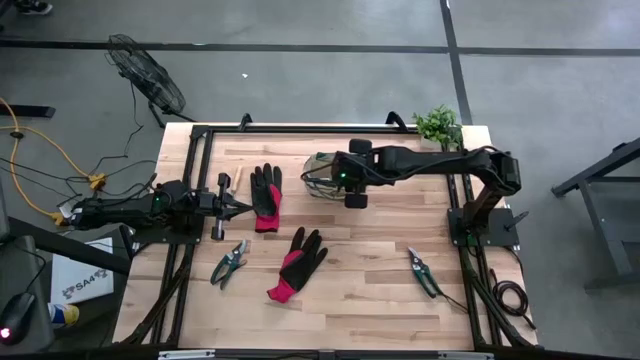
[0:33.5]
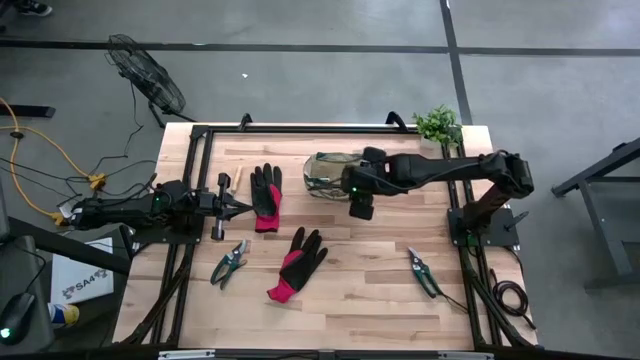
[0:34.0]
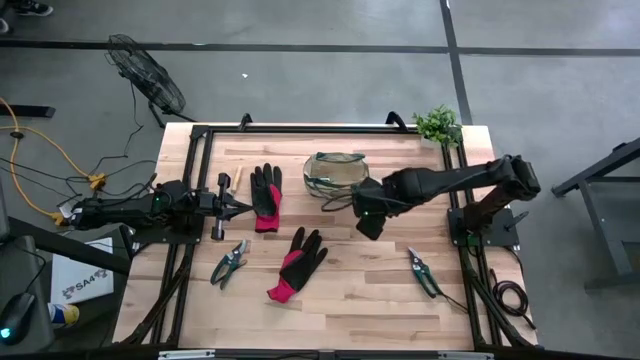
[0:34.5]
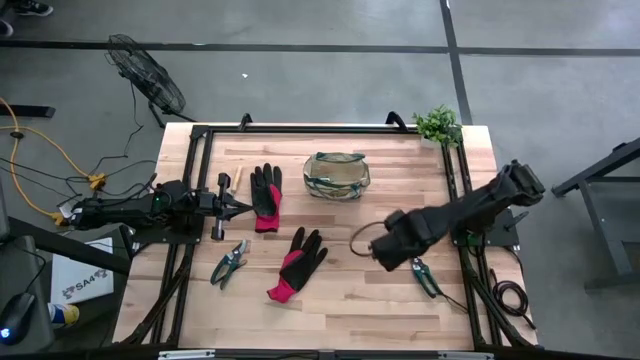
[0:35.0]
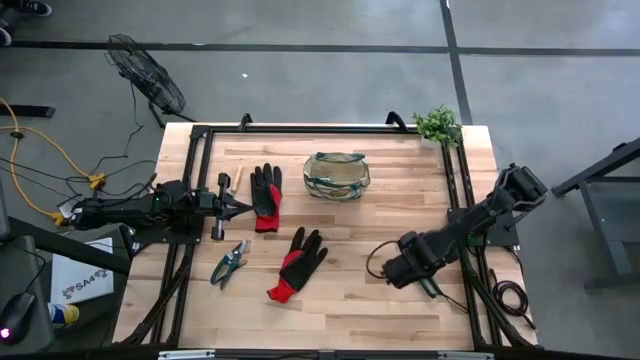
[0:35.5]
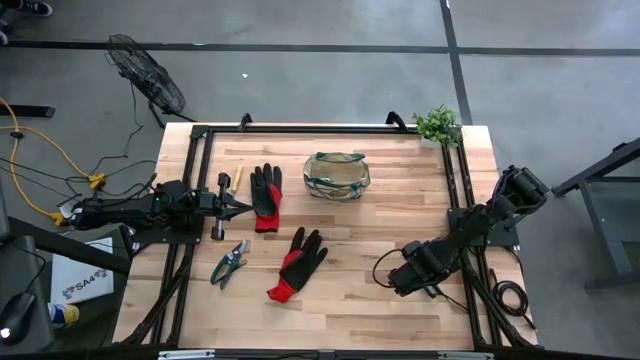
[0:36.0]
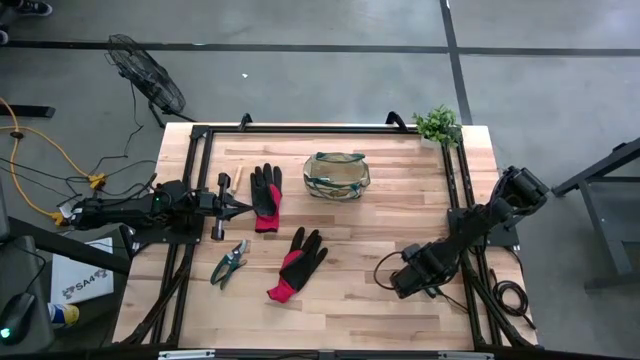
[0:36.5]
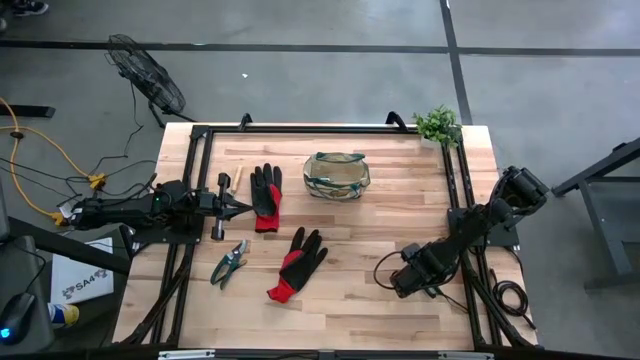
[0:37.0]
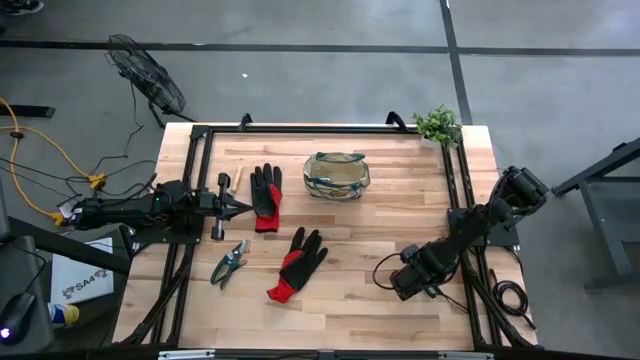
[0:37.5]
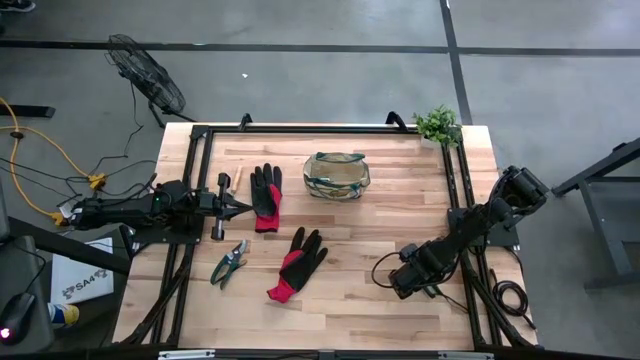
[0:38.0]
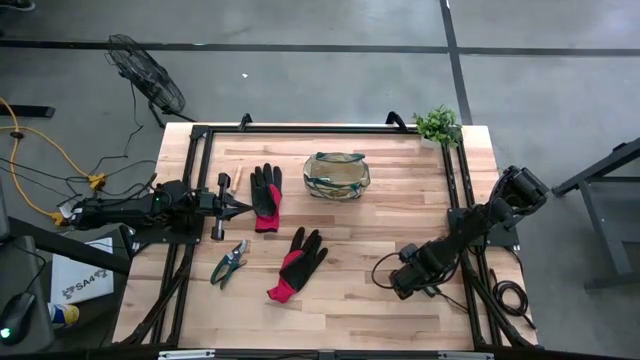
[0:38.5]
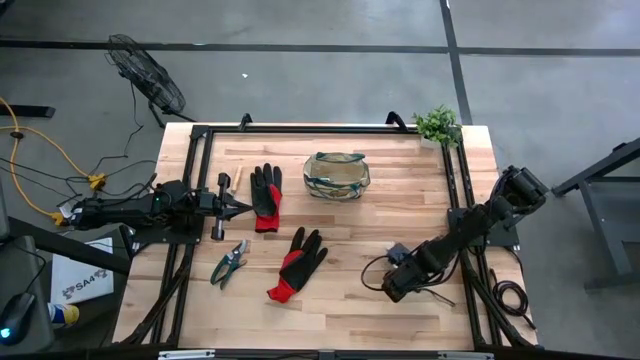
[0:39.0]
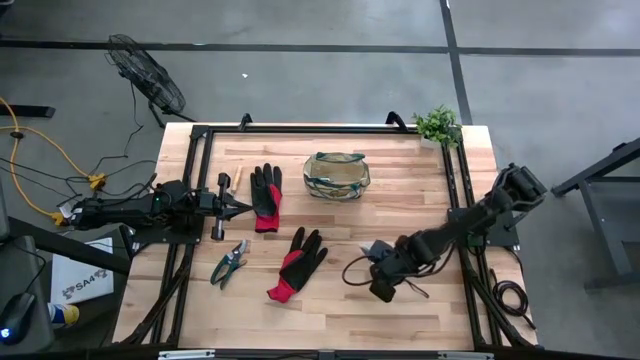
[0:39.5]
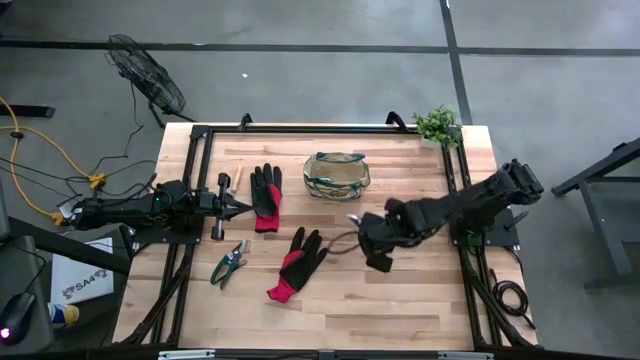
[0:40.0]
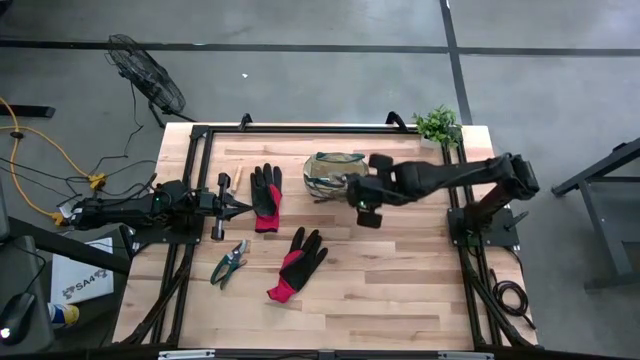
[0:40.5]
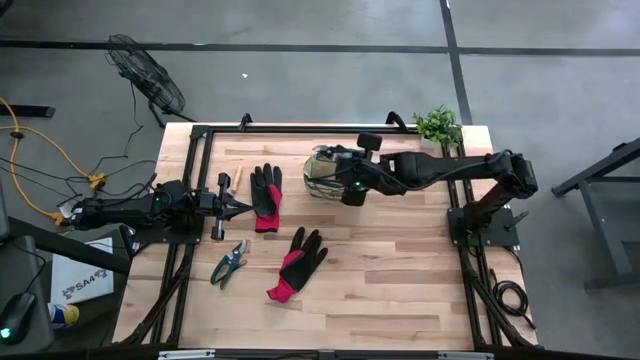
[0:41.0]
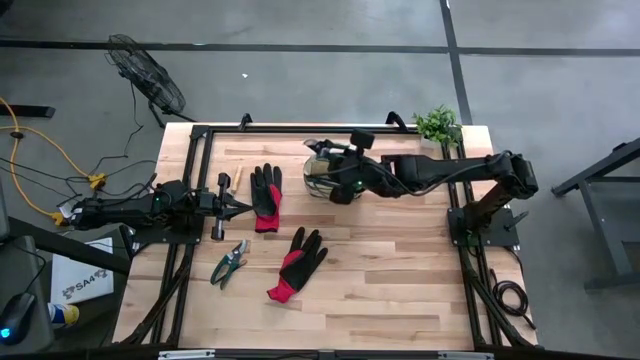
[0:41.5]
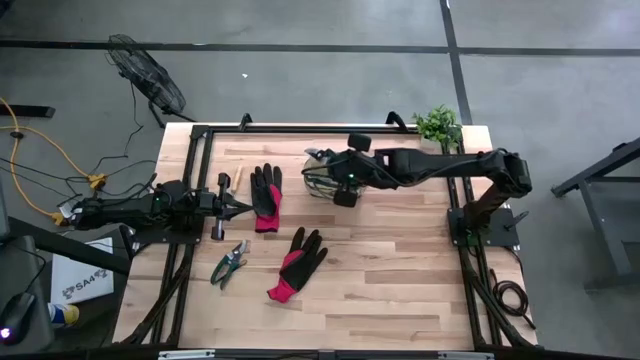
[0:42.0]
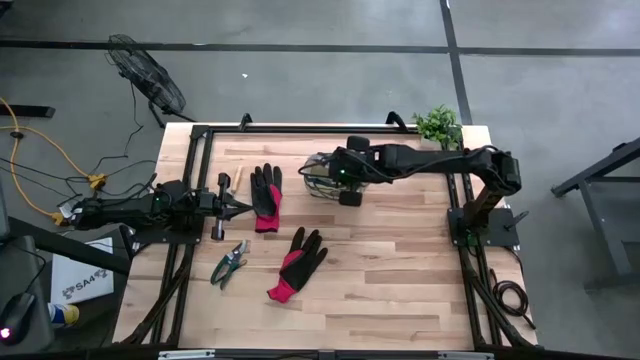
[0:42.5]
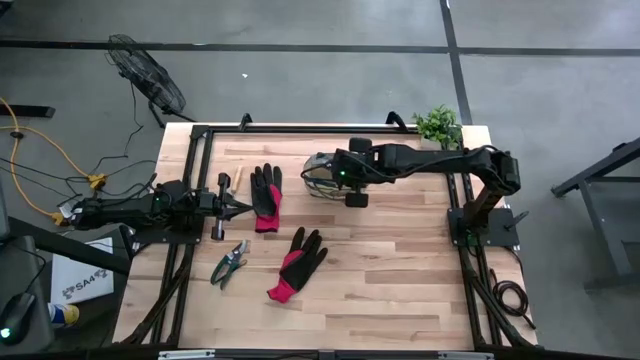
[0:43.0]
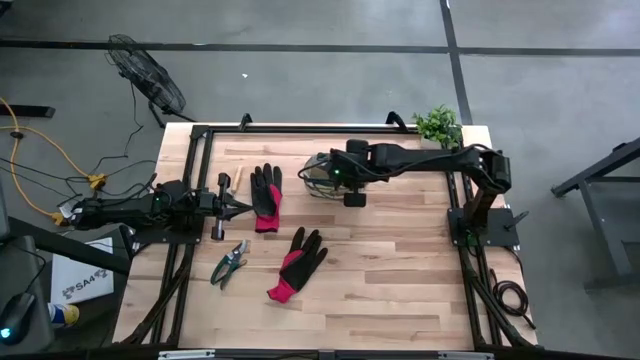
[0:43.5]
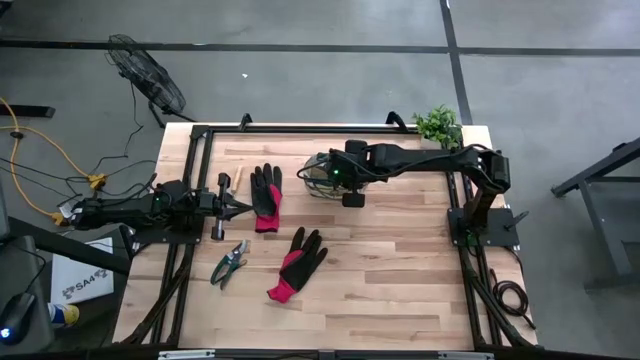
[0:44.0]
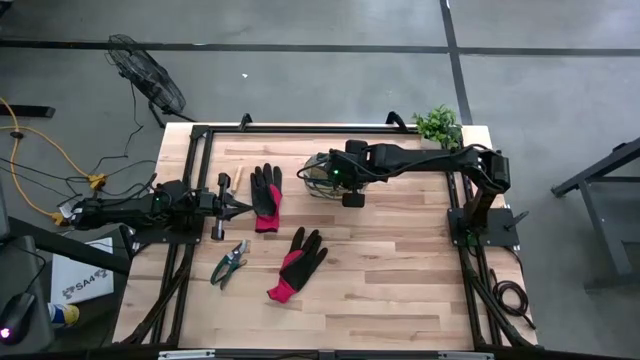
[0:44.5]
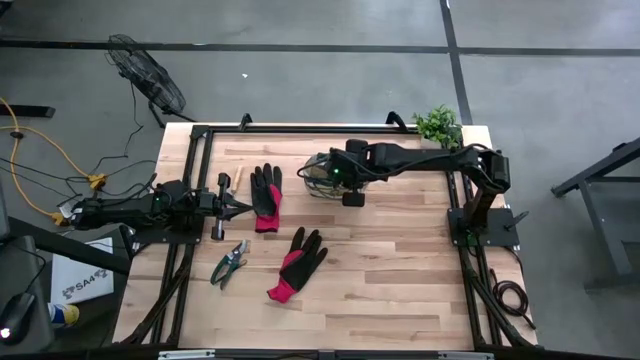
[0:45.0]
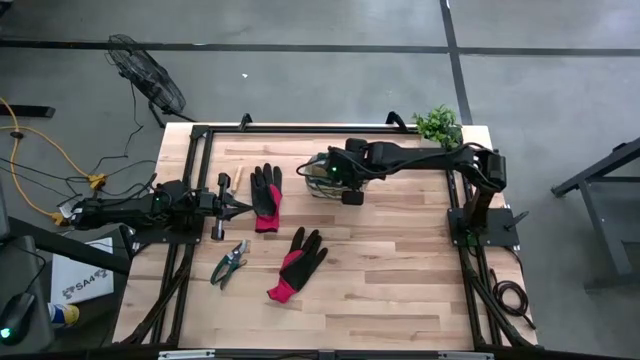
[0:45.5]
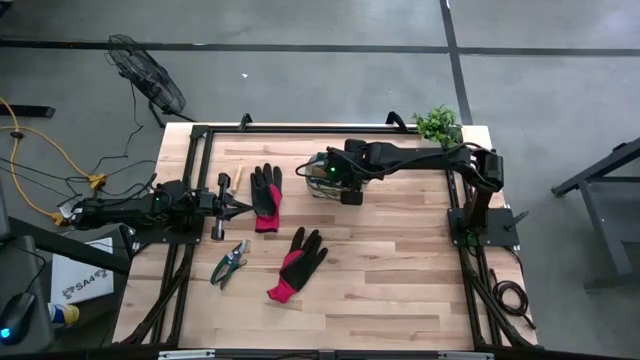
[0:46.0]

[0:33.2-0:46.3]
Task: Pick & Place Garden tools in Gardening bag
Put the right green shear scissors into the gardening bag

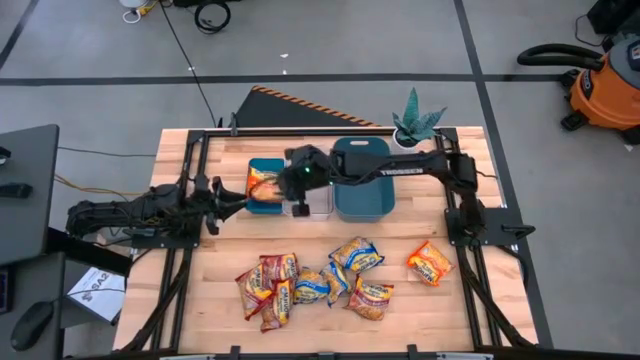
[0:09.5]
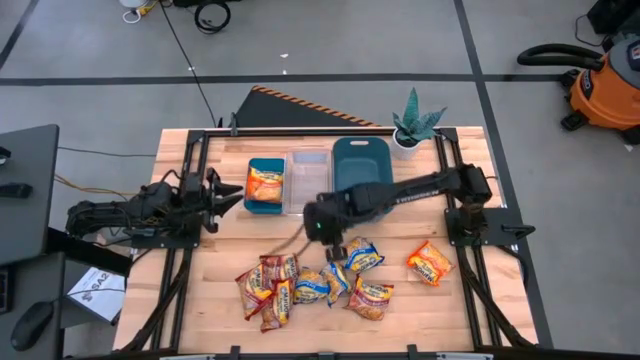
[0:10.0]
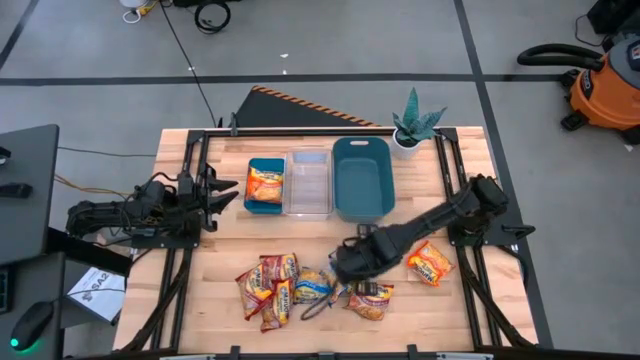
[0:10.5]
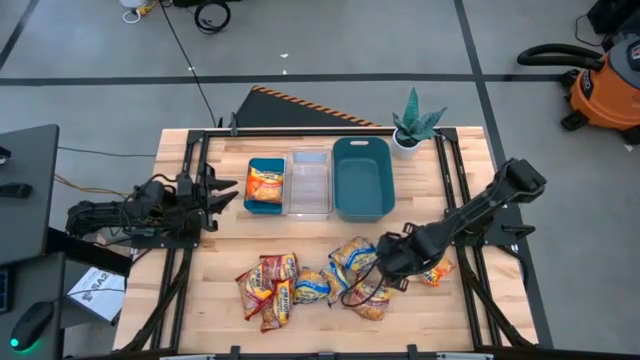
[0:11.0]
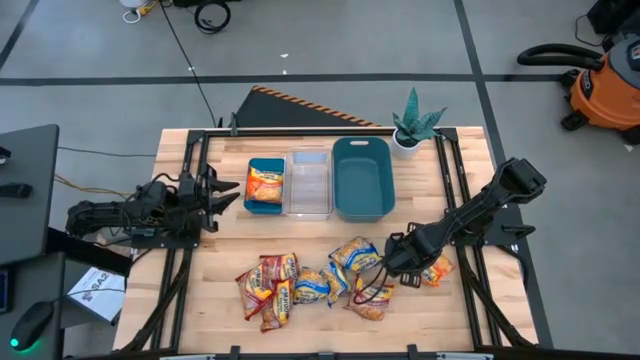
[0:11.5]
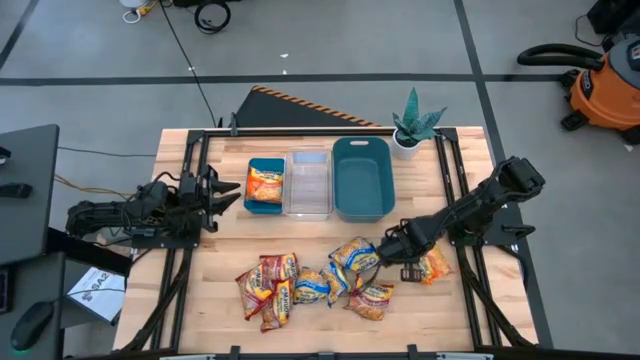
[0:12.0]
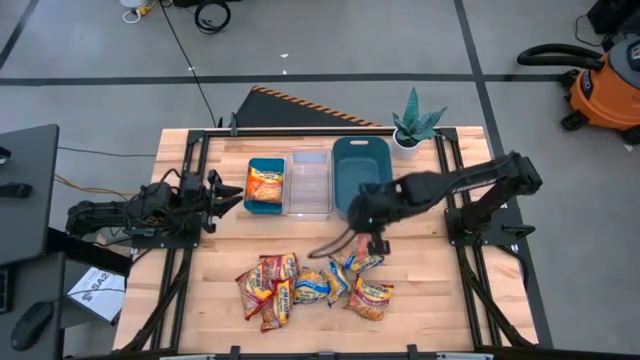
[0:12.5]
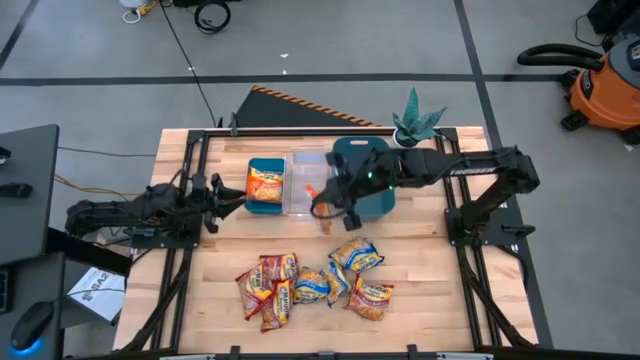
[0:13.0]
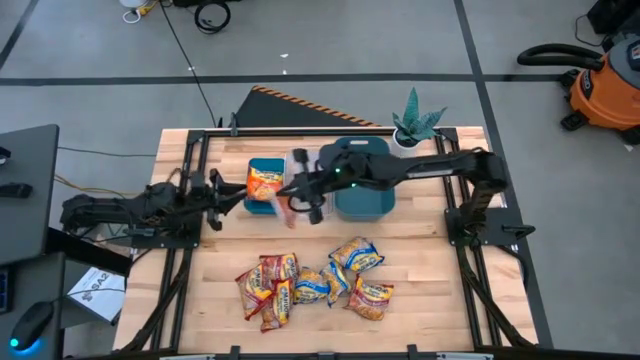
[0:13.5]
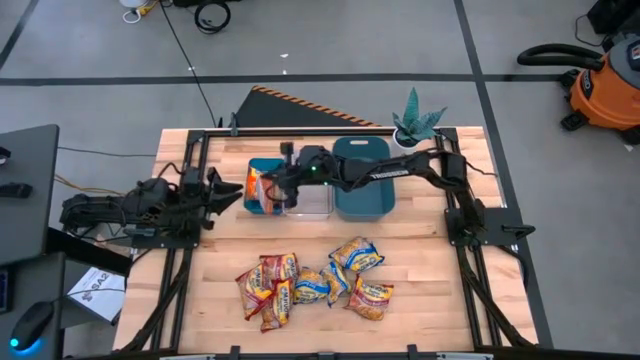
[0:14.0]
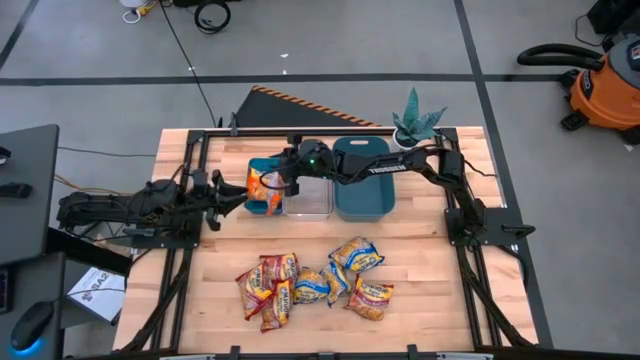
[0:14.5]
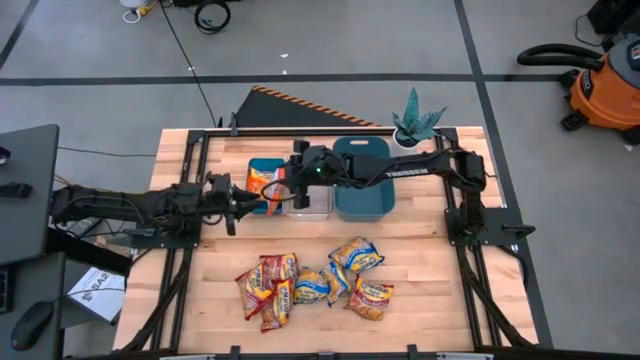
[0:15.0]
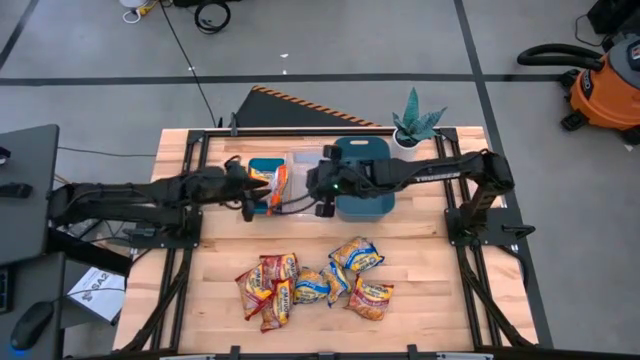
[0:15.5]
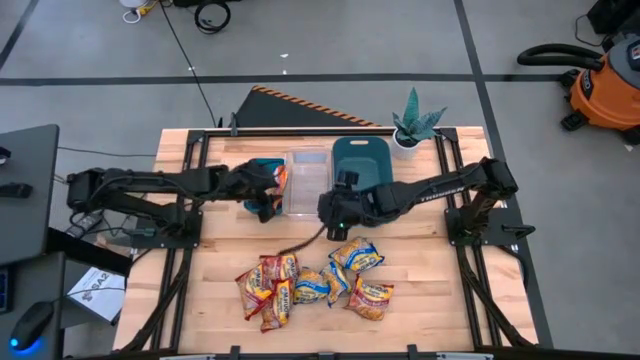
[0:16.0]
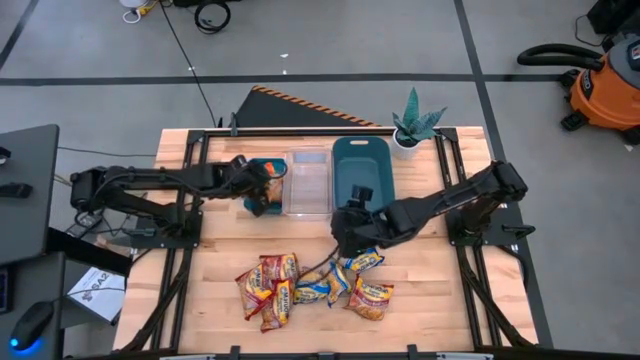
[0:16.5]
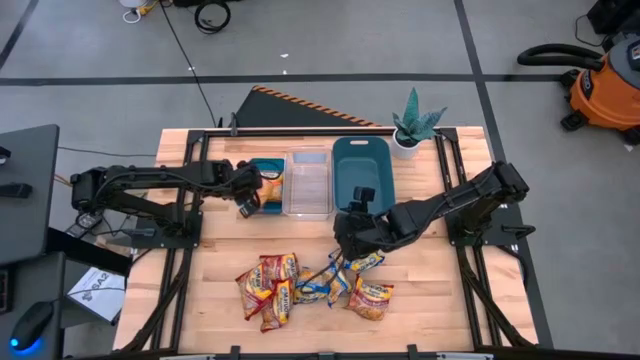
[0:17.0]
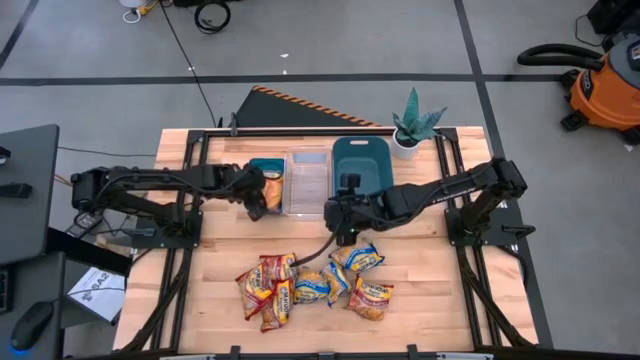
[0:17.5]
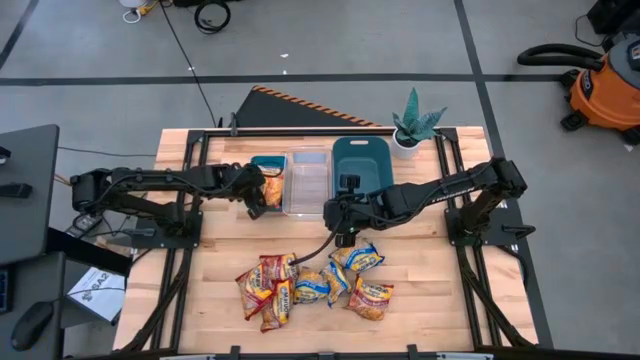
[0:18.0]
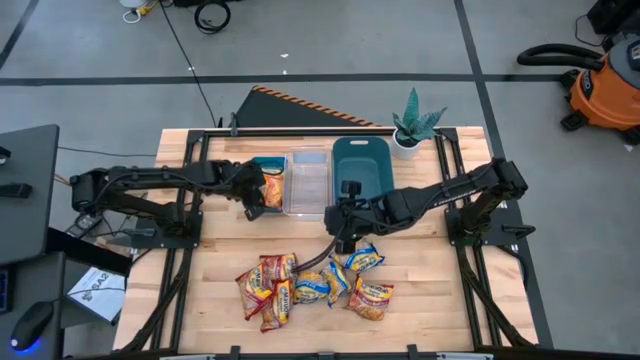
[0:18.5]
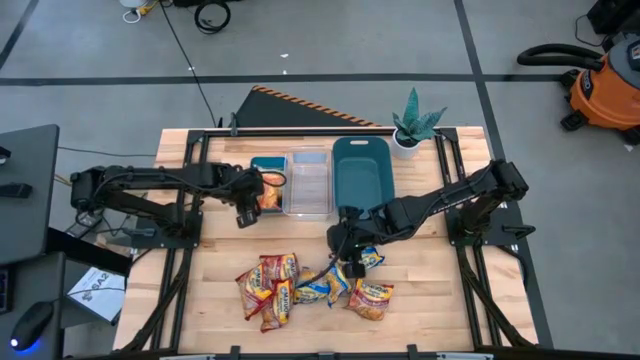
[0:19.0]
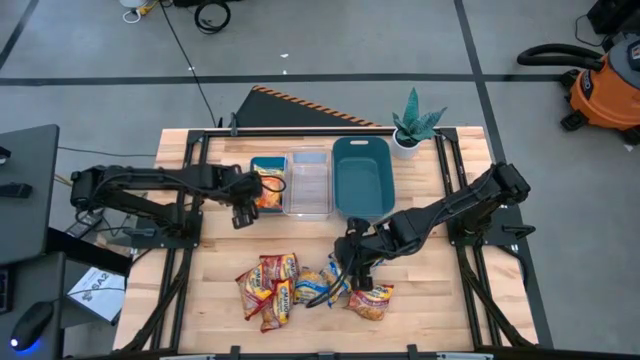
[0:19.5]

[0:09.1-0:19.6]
Task: Sort Maruchan noodles
Put the orange noodle pack into the blue bin
